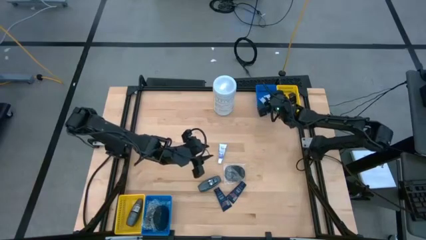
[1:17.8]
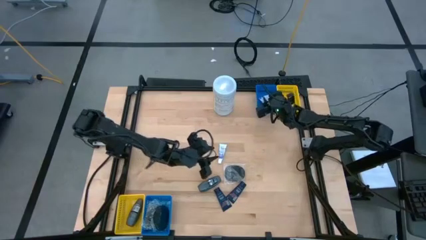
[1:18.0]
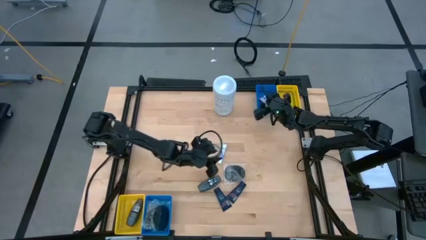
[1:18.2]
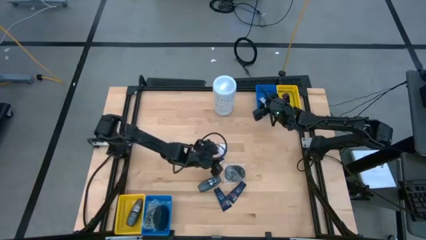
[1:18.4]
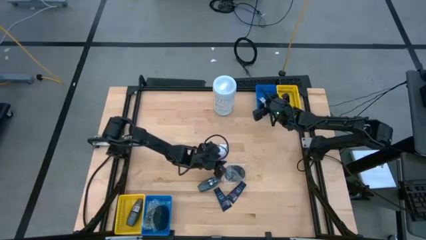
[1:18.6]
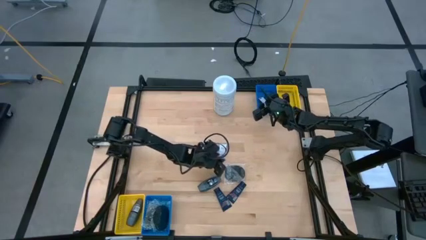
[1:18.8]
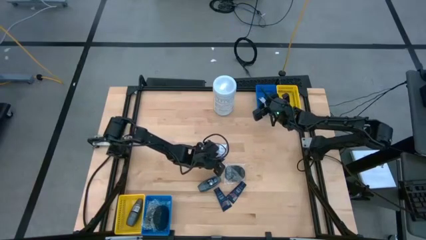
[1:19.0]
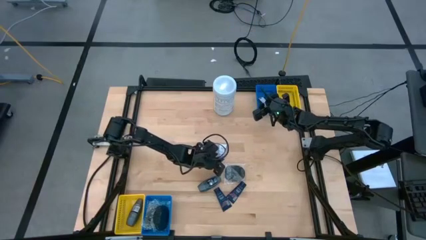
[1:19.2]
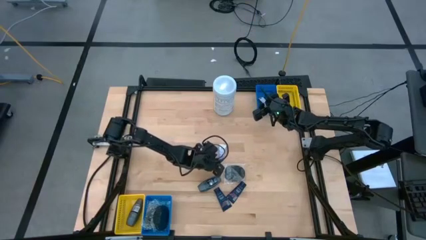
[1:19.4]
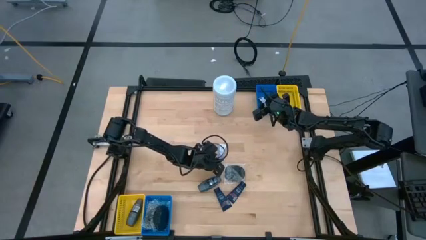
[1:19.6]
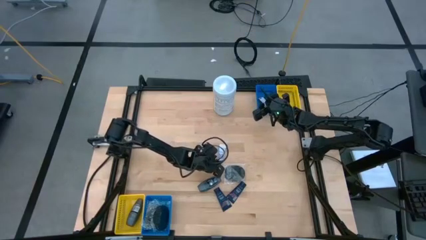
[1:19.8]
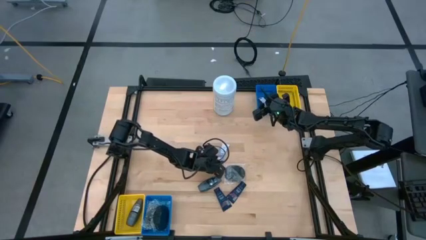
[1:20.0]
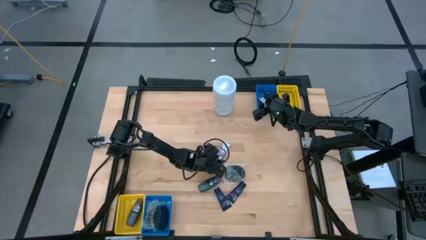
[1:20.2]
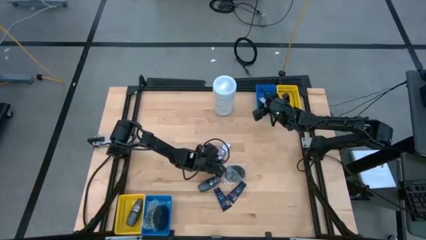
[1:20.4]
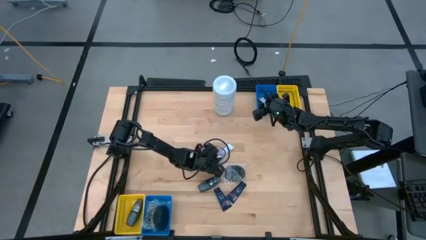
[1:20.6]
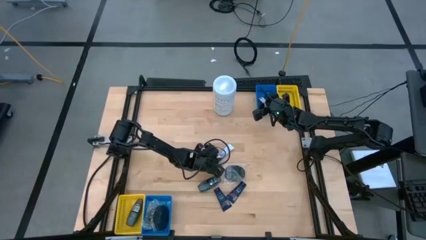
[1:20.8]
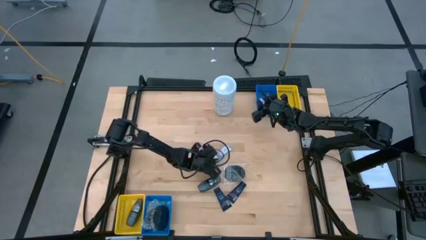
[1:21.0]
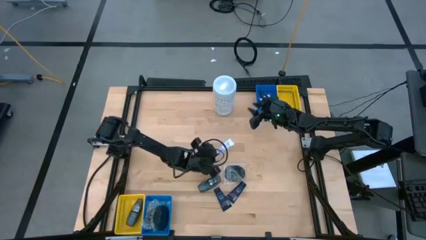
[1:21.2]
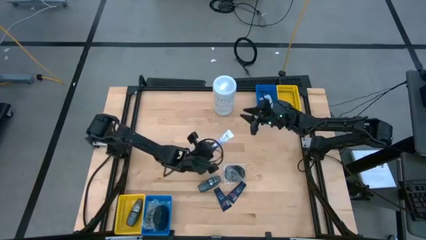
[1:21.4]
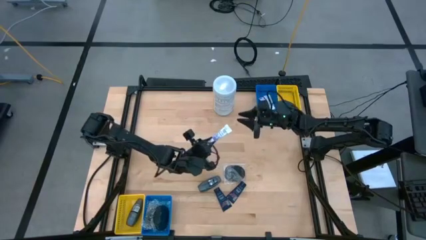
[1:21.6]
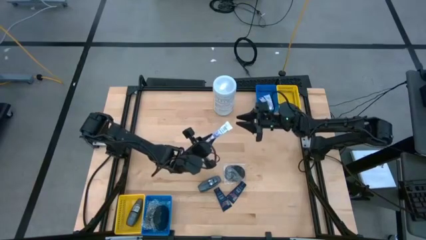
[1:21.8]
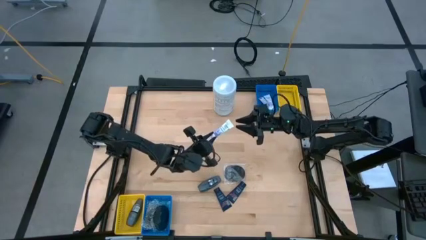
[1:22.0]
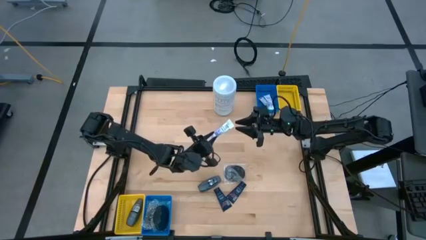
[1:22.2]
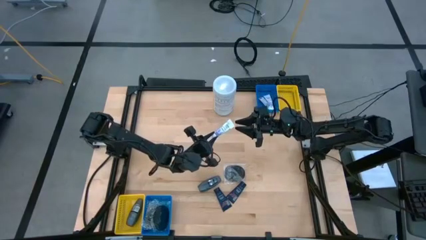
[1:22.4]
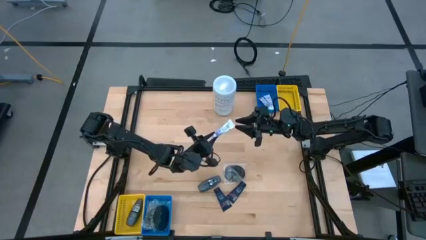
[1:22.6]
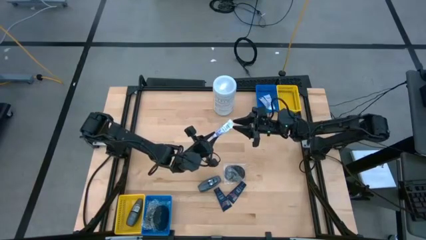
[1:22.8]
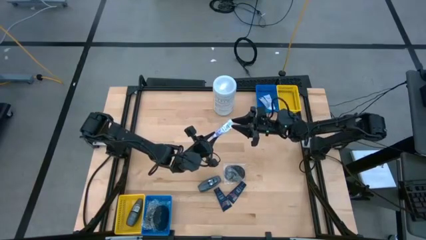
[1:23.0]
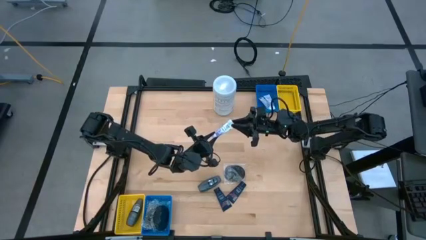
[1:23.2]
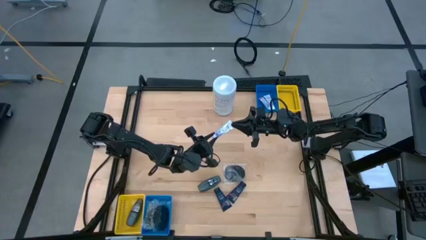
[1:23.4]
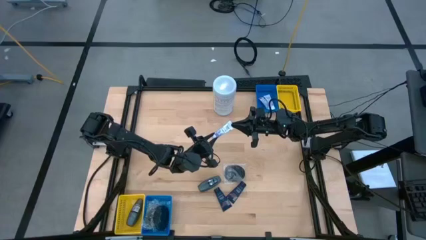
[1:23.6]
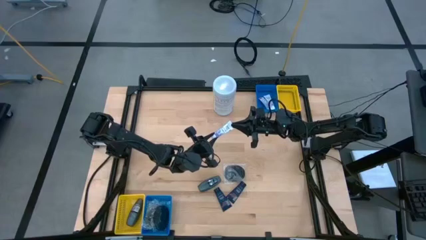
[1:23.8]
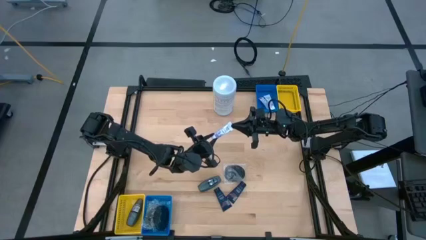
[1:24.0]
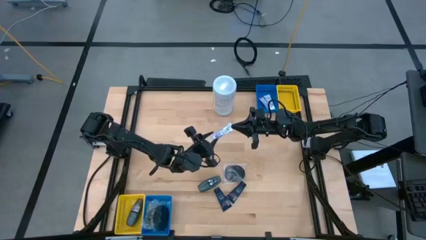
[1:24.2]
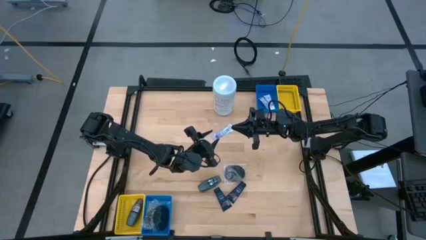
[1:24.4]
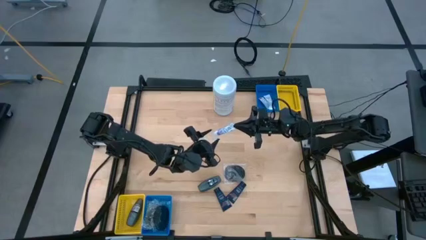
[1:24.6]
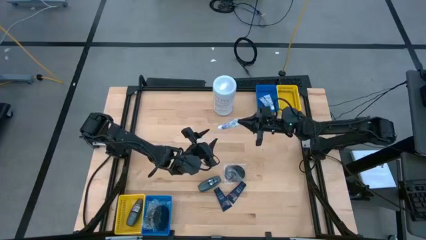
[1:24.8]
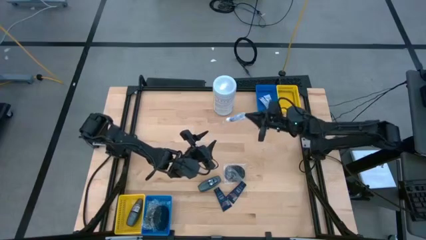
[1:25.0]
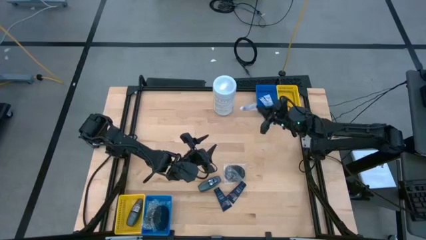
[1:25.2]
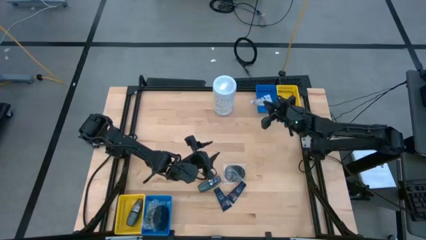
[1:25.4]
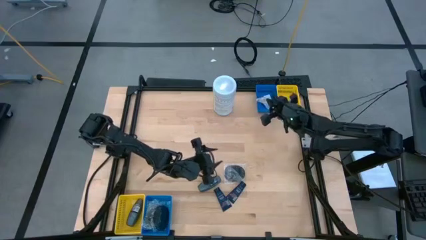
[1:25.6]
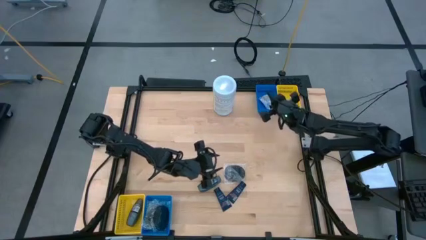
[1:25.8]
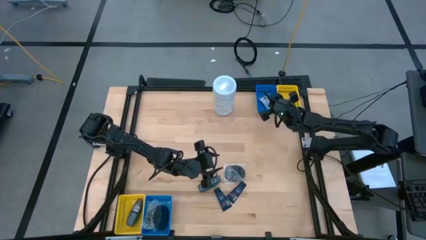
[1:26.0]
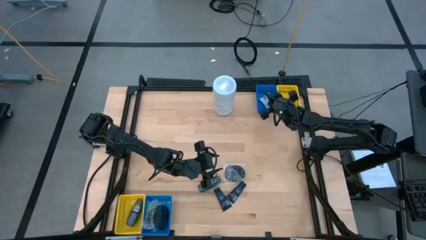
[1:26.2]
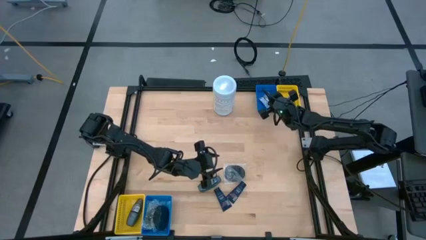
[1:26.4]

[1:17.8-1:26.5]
Task: Pick & Place Travel size toiletries
Put the white toothpaste into the top blue bin

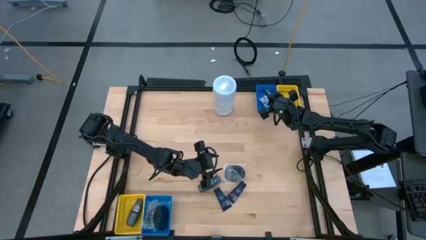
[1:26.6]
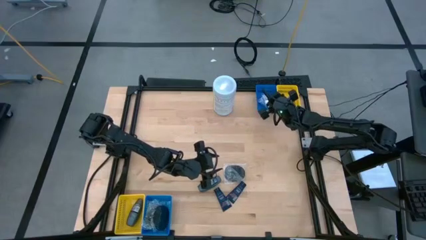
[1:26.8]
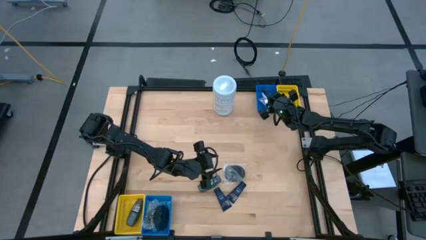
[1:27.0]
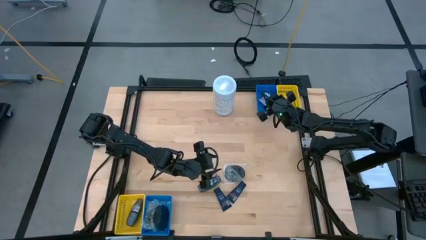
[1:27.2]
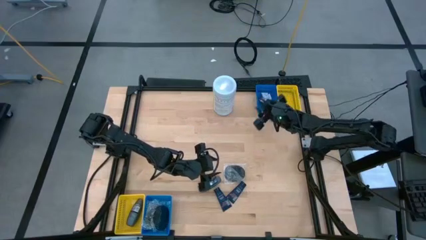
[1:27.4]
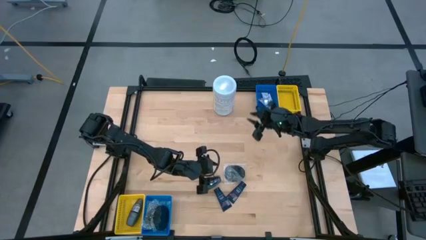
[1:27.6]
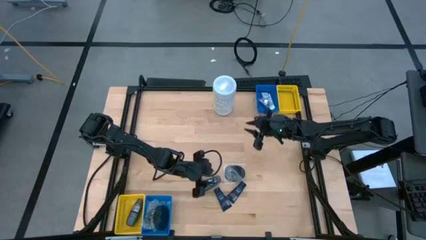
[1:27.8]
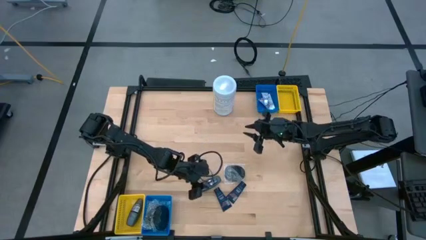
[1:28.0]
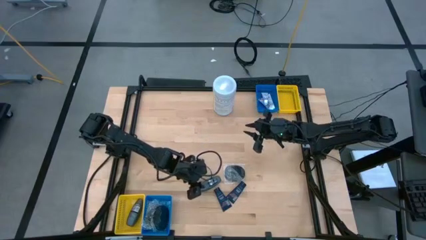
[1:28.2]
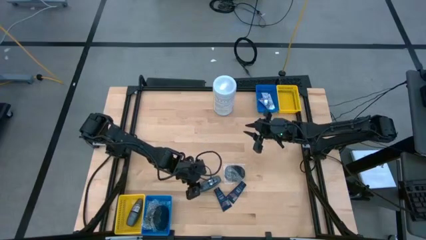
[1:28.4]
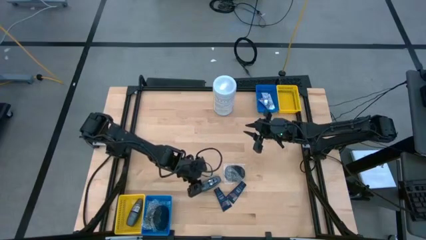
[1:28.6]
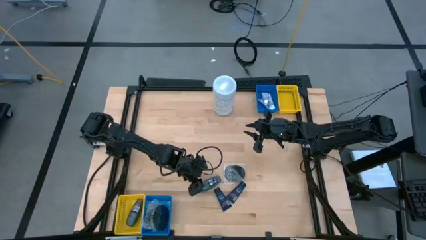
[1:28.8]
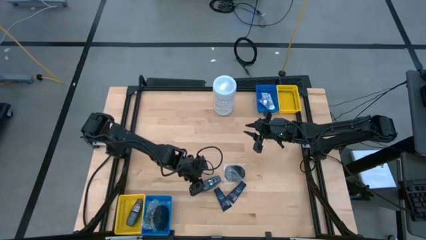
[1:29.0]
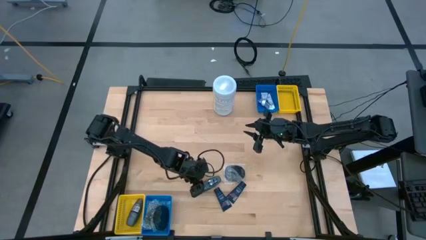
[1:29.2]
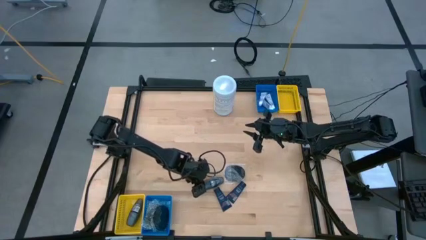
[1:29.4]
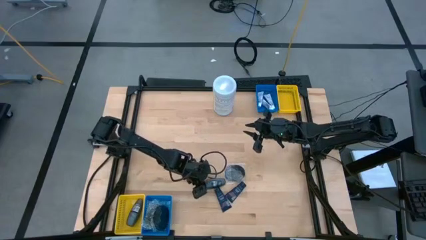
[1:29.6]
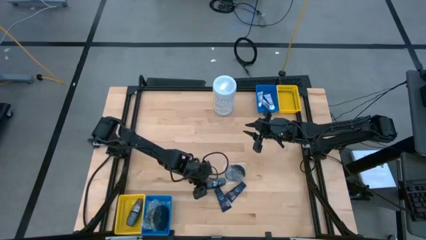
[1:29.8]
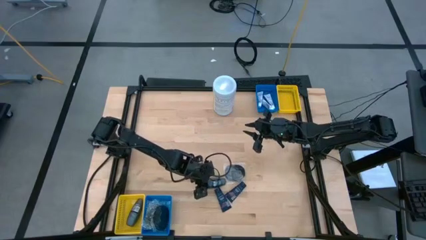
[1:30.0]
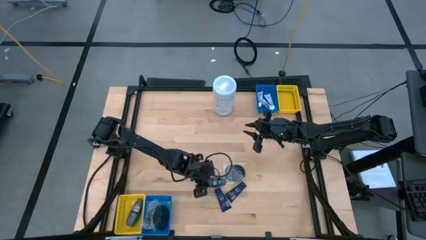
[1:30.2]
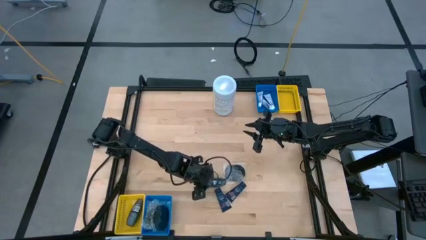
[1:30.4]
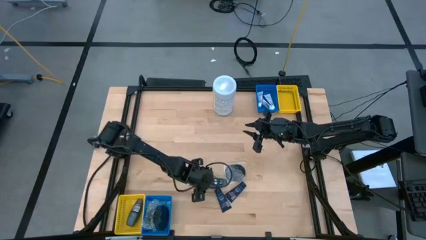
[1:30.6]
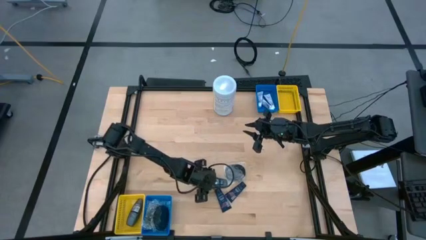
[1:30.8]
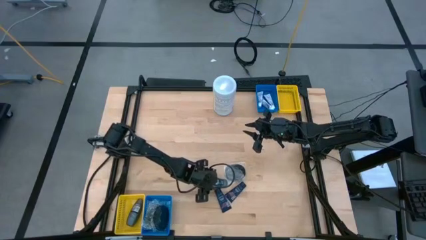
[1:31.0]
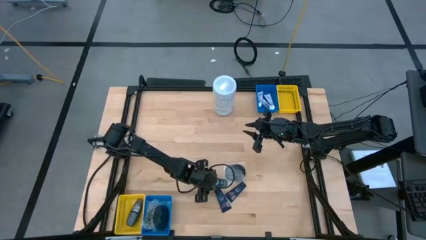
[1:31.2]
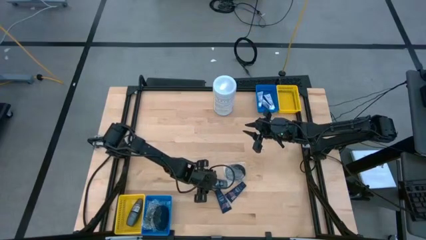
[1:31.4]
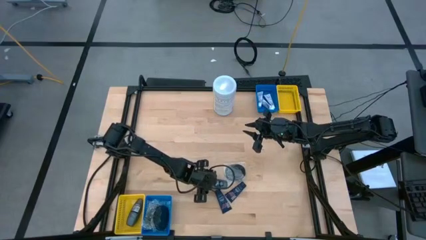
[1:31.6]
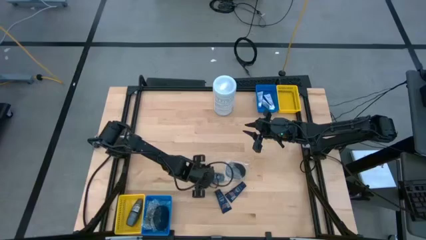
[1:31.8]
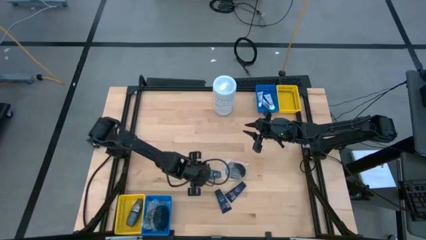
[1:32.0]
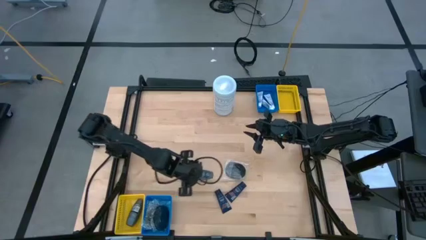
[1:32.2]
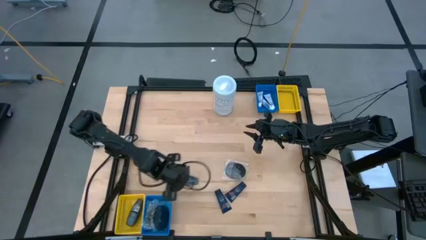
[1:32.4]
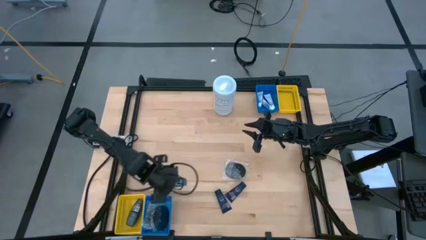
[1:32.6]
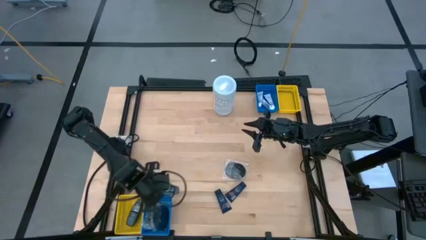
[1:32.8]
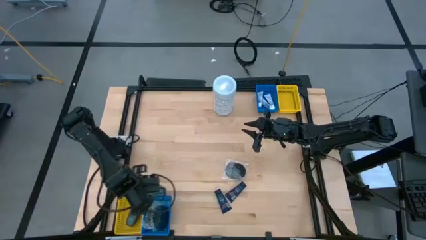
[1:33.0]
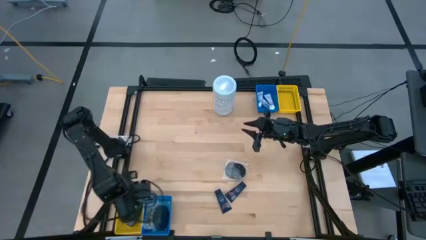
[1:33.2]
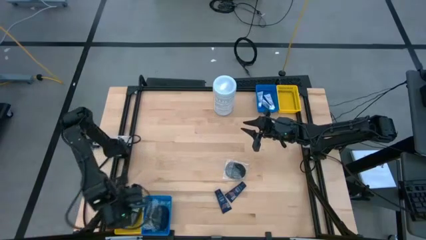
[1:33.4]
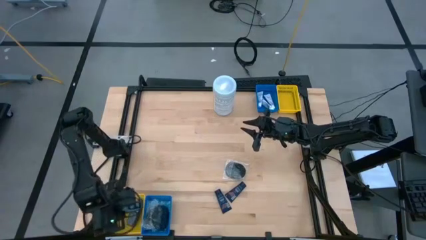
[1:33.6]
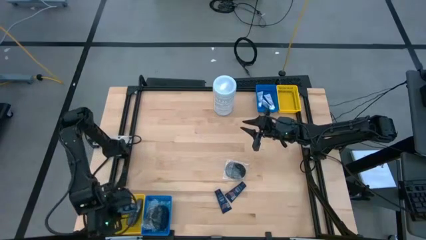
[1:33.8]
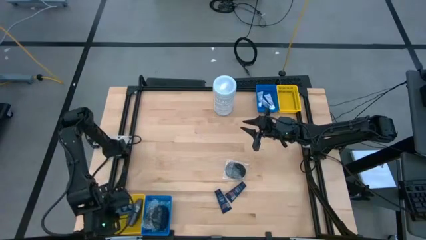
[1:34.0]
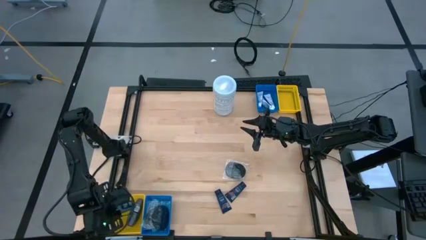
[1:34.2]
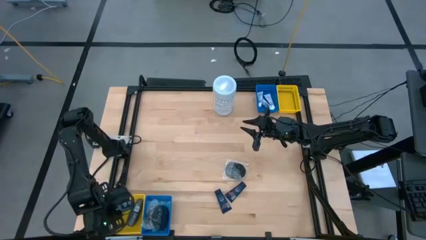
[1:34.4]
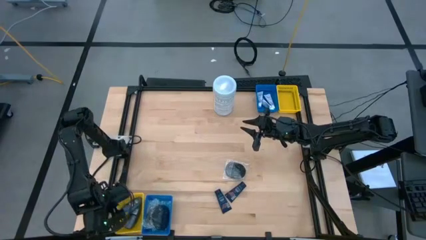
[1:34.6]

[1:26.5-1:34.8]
Put the gray deodorant into the bottom yellow bin
